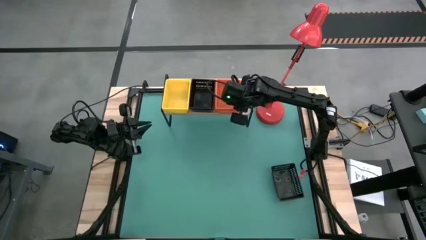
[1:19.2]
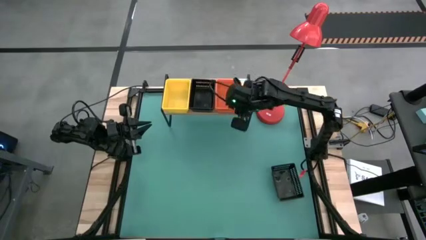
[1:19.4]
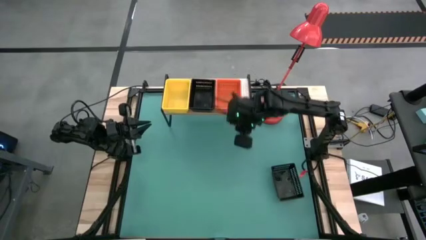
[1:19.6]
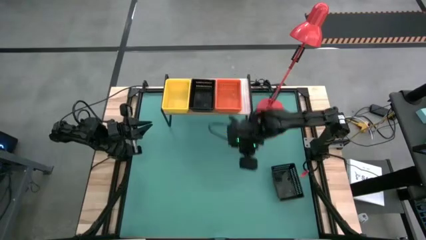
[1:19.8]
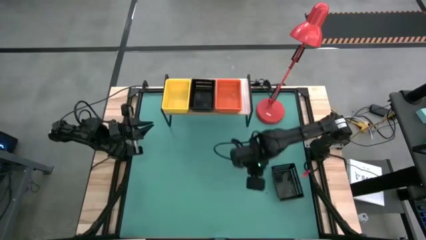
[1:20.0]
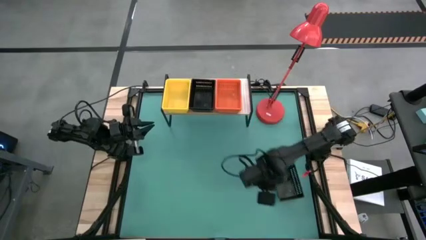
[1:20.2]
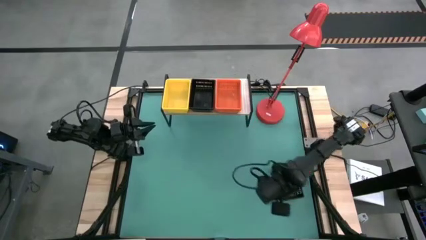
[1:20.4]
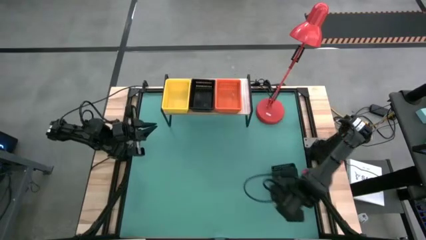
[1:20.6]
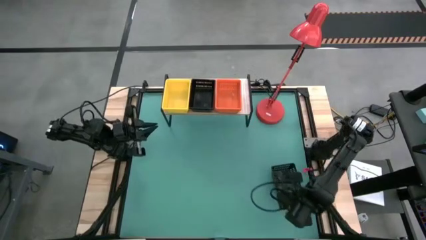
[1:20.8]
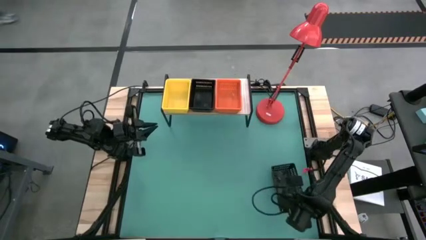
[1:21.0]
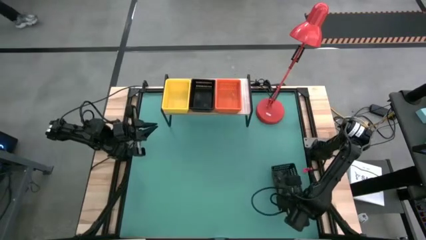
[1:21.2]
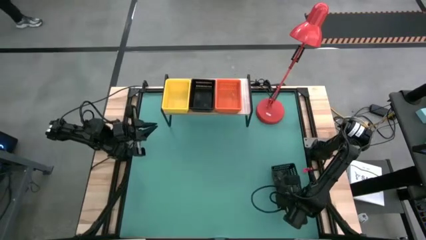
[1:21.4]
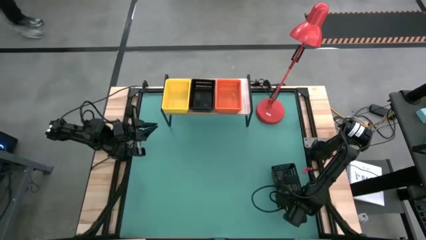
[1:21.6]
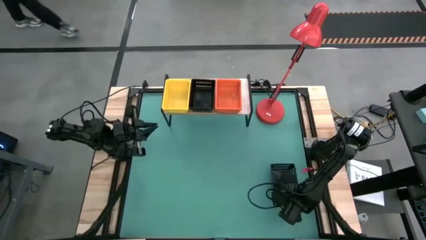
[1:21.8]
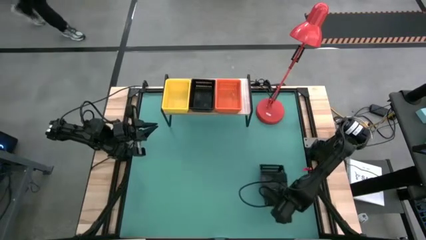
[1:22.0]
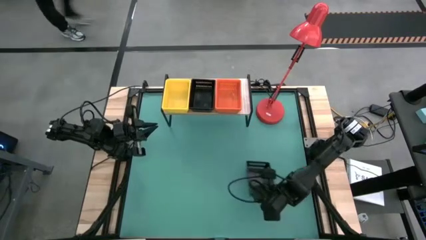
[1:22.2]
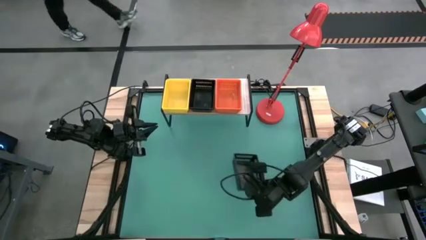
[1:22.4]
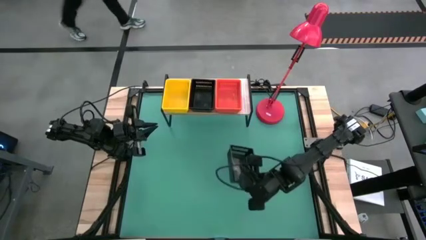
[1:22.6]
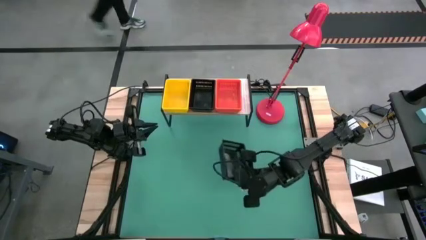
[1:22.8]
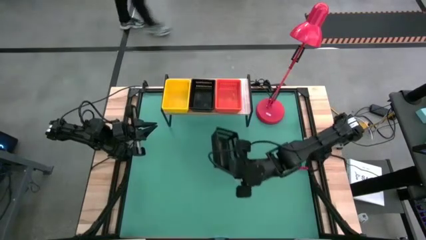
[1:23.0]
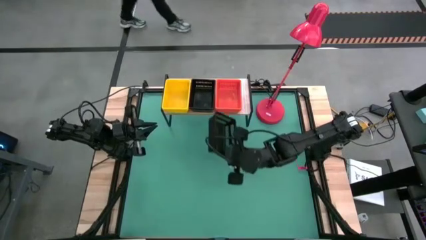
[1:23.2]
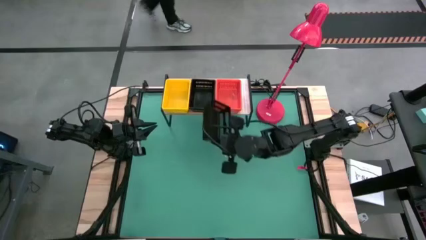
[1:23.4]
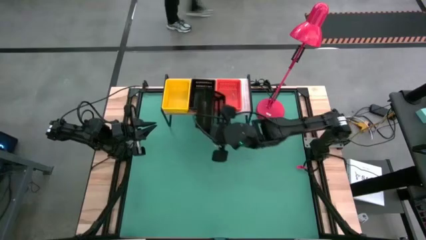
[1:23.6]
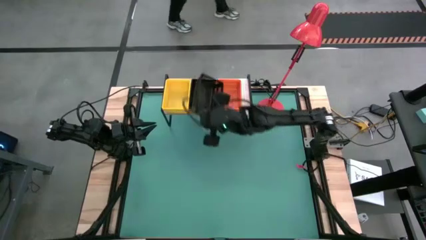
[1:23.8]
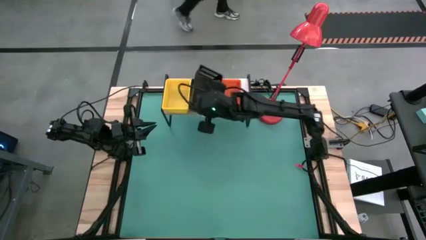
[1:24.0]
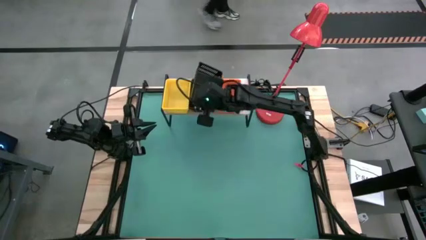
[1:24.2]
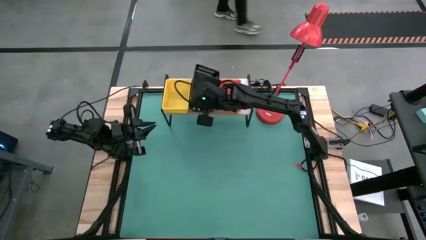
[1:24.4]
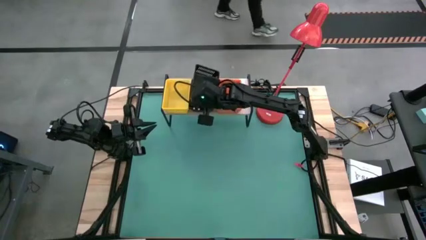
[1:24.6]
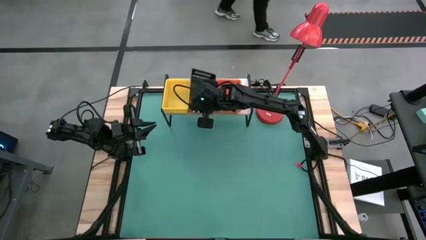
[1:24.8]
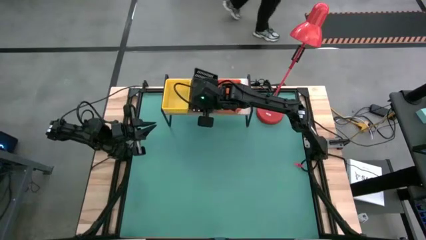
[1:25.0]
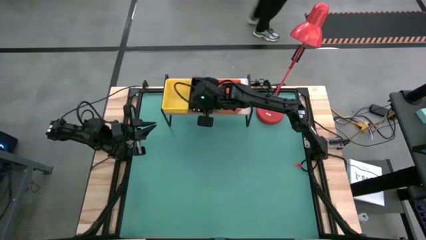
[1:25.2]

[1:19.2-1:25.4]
Task: Stack baskets on shelf by color
Stack the black bin on top of the black bin on the shelf

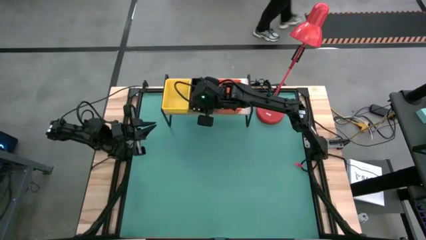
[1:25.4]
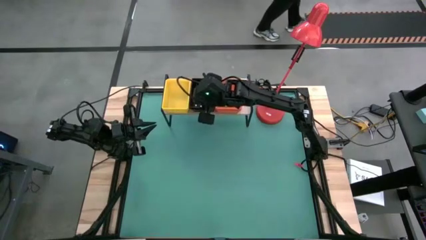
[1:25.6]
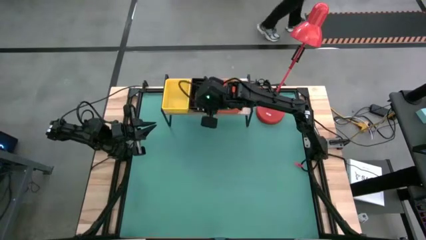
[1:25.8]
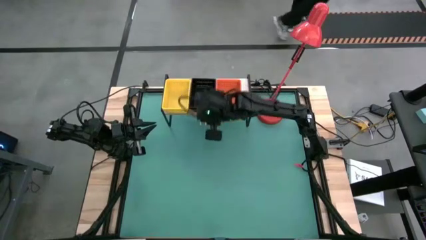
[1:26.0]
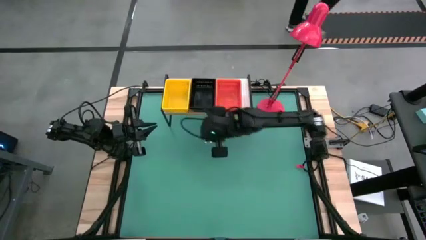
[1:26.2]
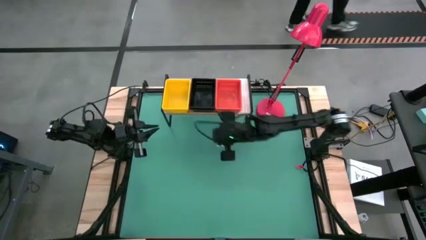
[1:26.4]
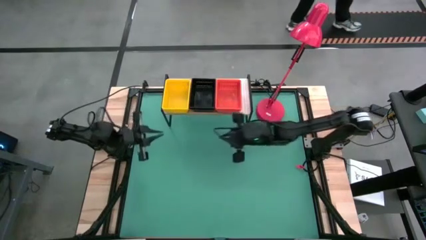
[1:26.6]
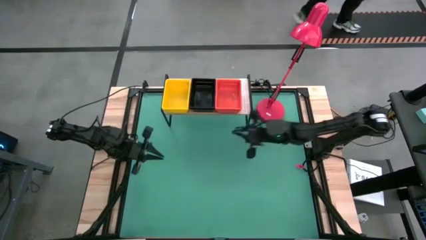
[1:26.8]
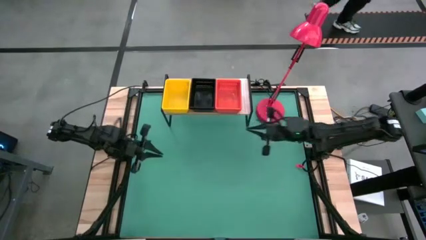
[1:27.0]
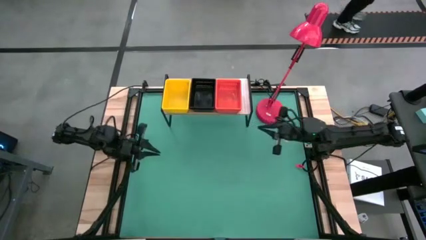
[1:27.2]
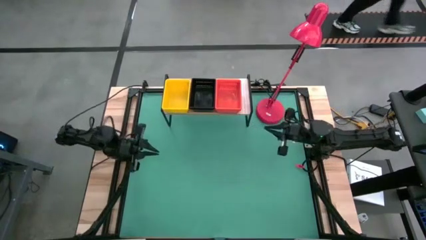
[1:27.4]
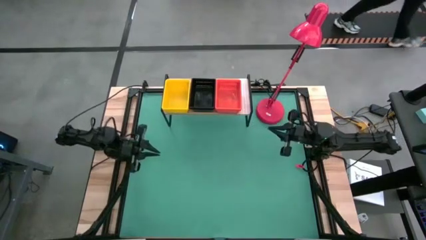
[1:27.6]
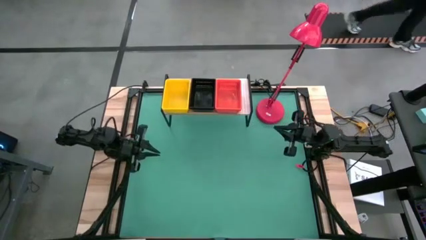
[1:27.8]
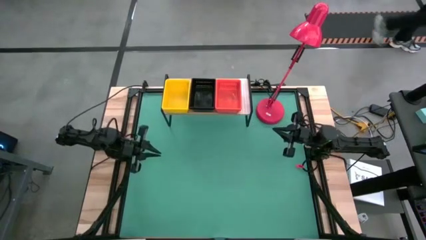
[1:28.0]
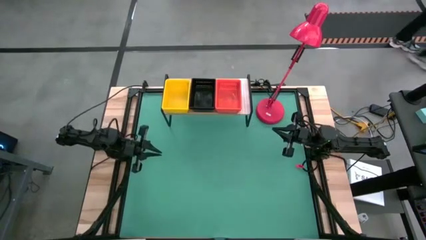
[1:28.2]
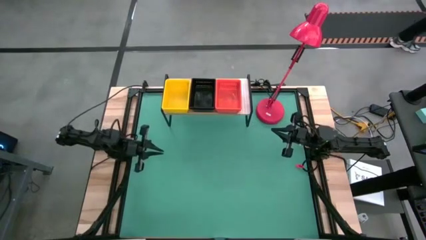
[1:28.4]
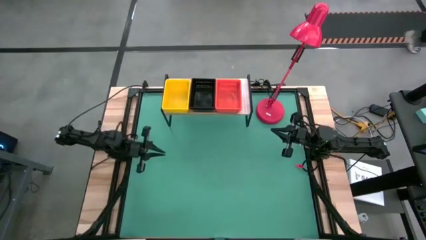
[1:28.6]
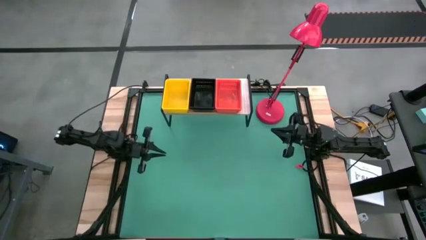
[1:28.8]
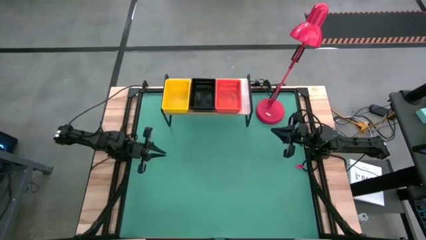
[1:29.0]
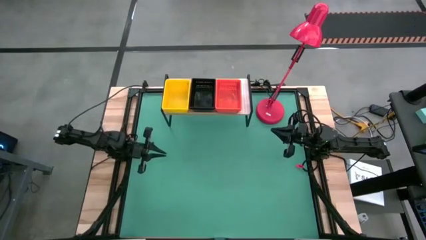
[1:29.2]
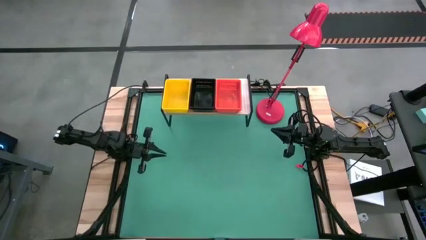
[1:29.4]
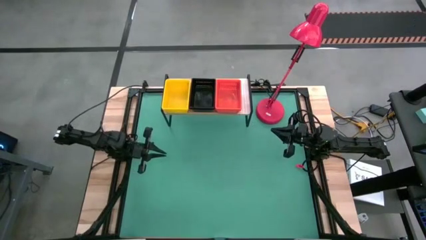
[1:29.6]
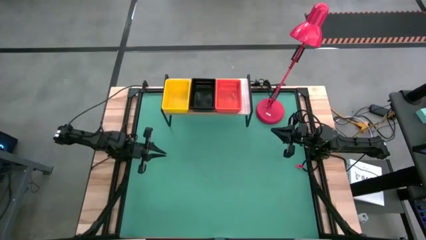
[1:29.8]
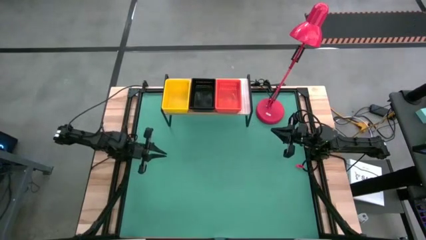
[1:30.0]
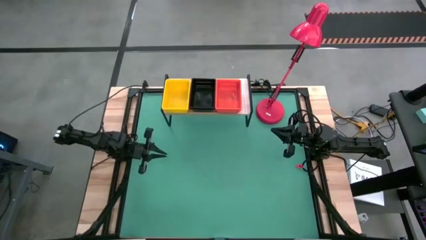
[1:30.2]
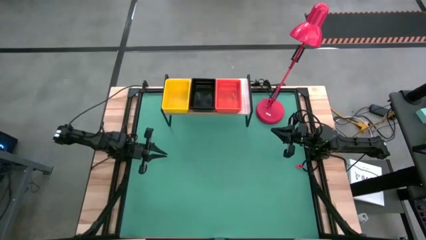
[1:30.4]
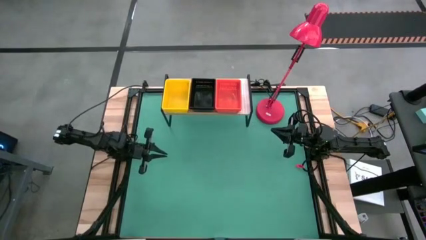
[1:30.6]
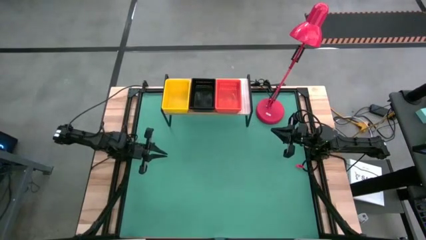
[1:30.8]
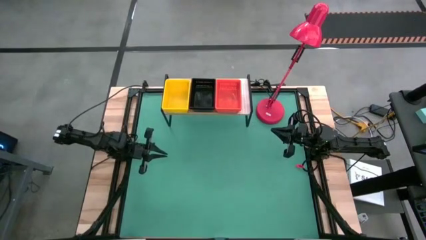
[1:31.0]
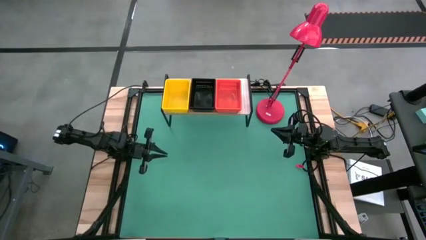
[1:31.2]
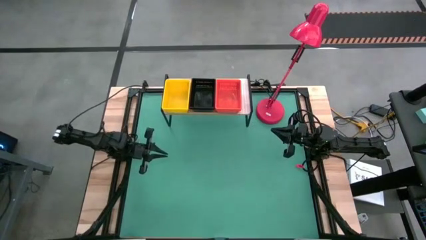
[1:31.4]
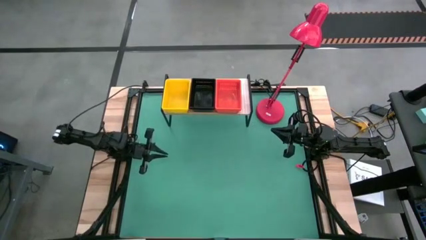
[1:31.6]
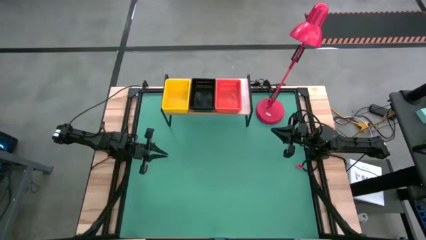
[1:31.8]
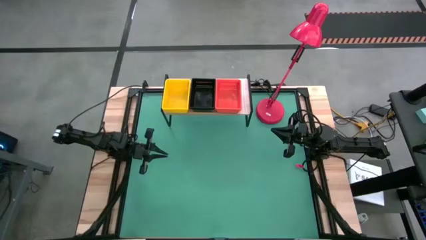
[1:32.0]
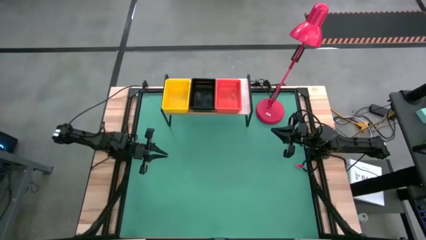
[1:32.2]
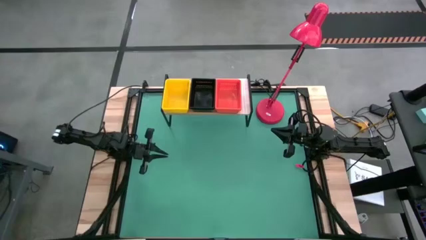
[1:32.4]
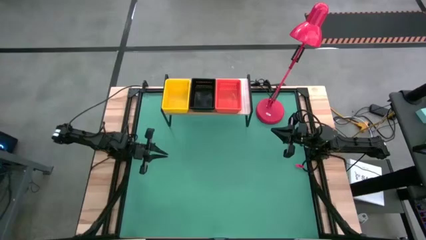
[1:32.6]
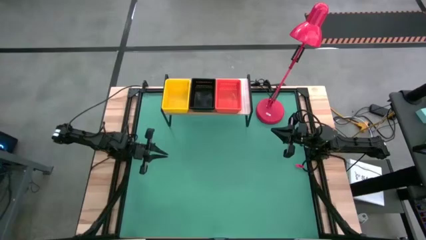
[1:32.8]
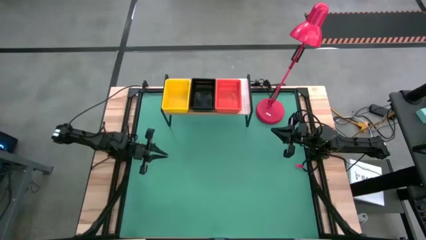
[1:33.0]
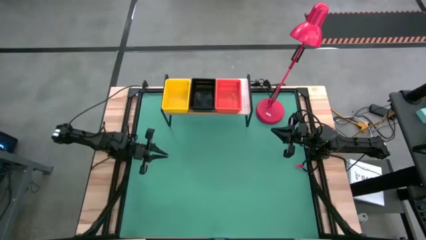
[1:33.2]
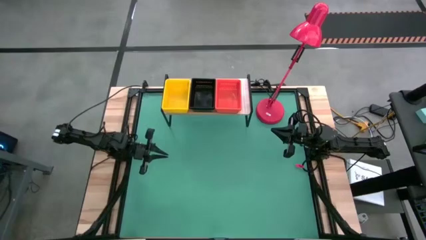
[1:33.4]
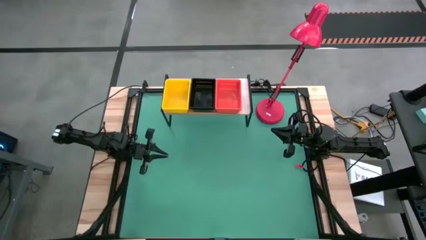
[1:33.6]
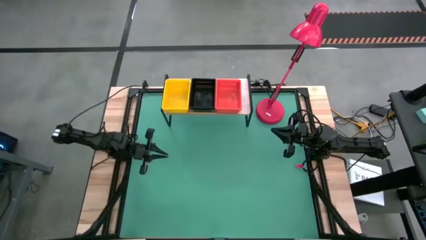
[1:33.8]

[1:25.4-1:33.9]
Return to Home Position
